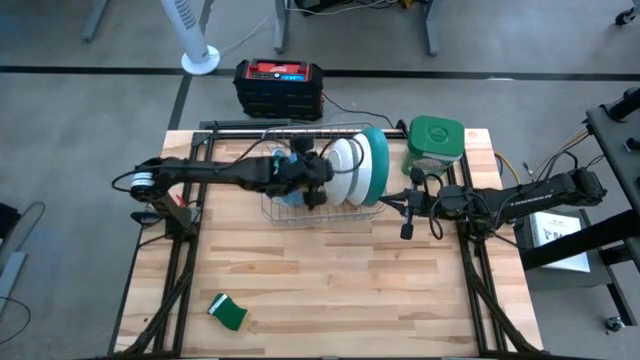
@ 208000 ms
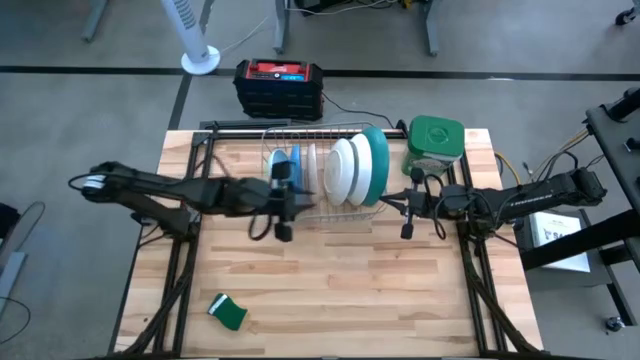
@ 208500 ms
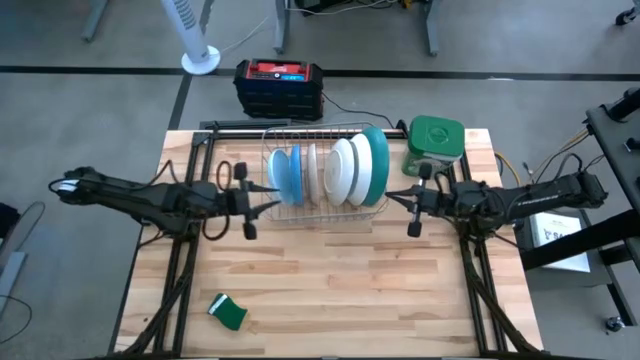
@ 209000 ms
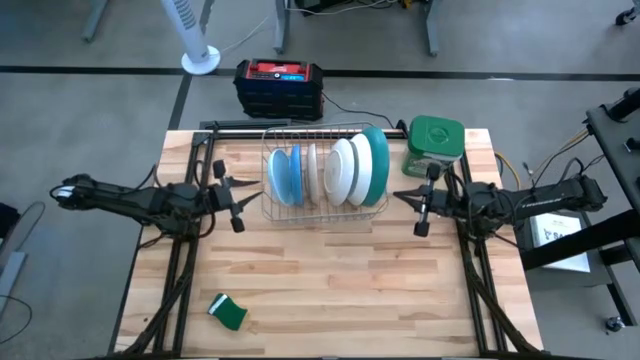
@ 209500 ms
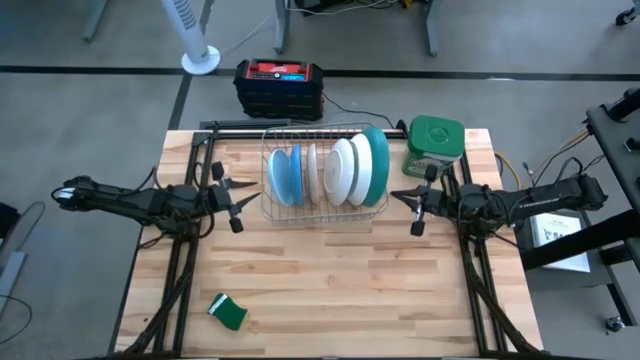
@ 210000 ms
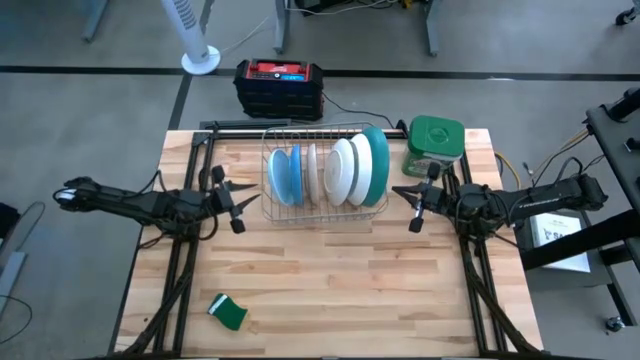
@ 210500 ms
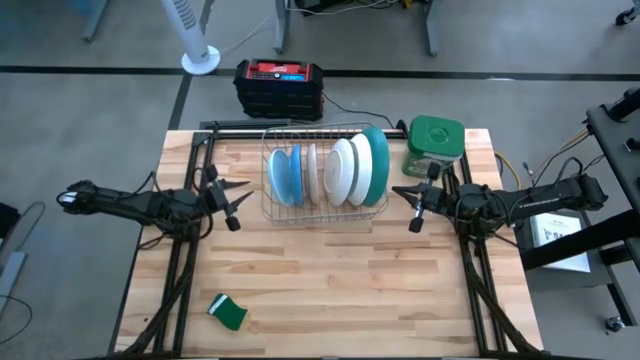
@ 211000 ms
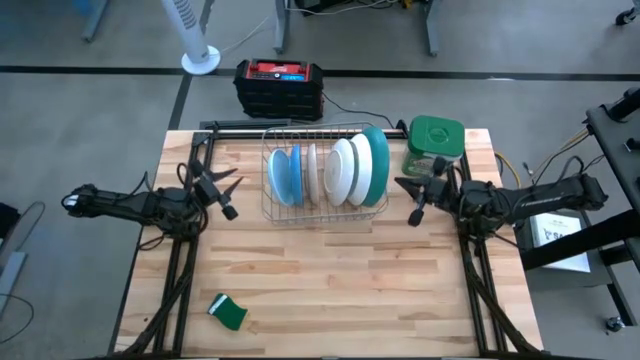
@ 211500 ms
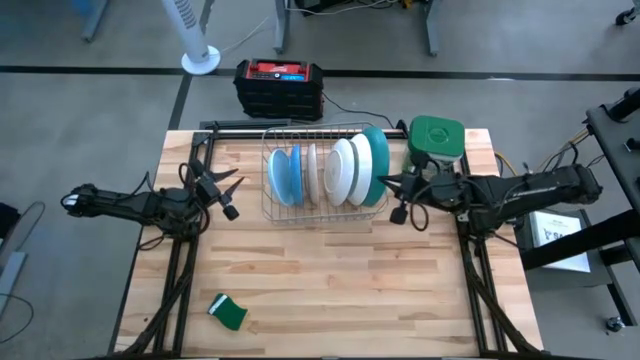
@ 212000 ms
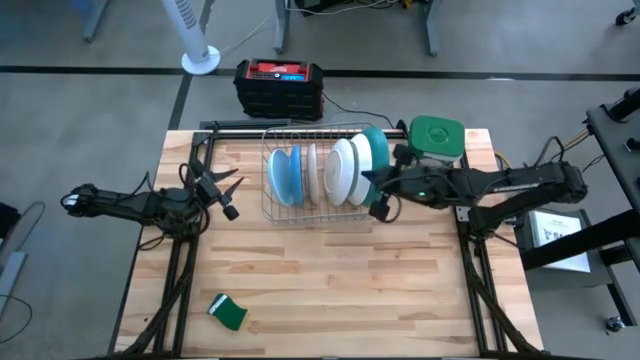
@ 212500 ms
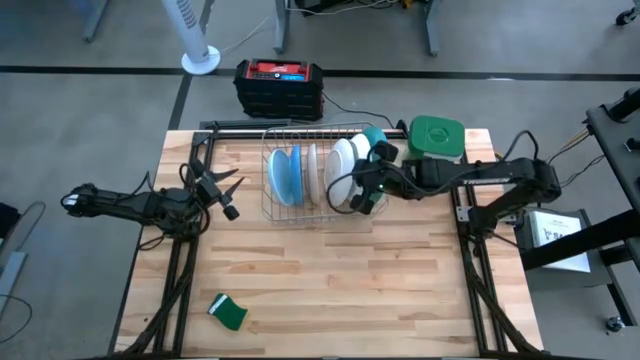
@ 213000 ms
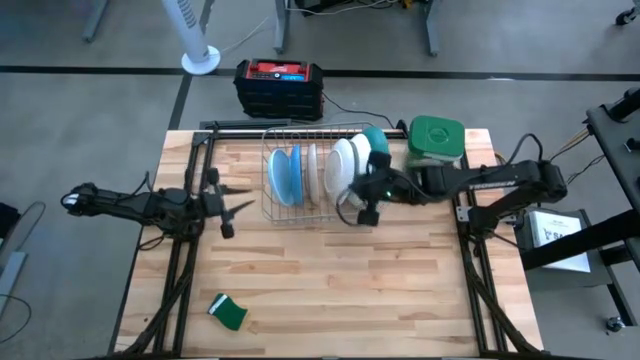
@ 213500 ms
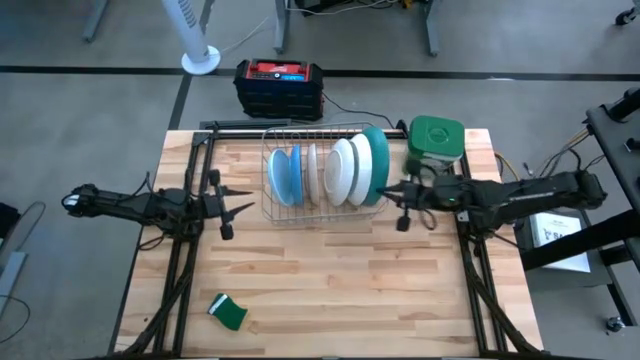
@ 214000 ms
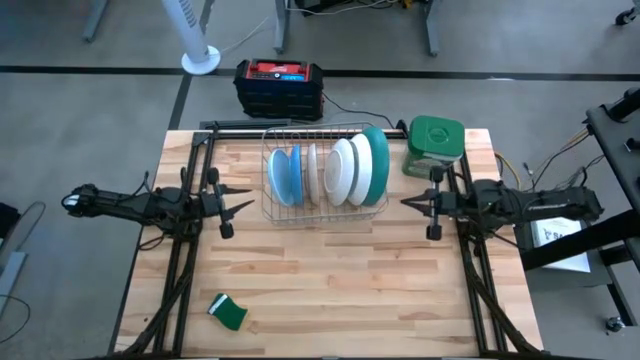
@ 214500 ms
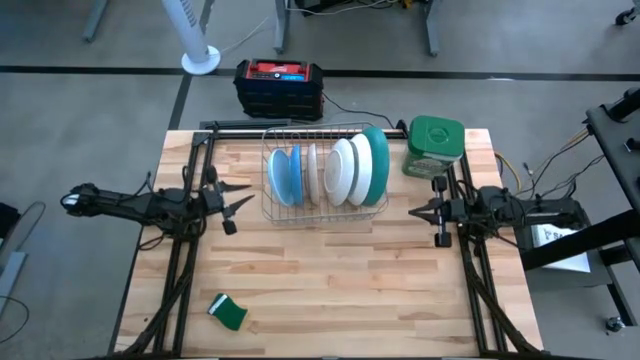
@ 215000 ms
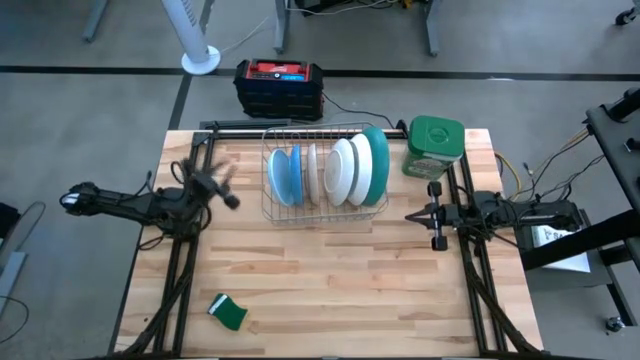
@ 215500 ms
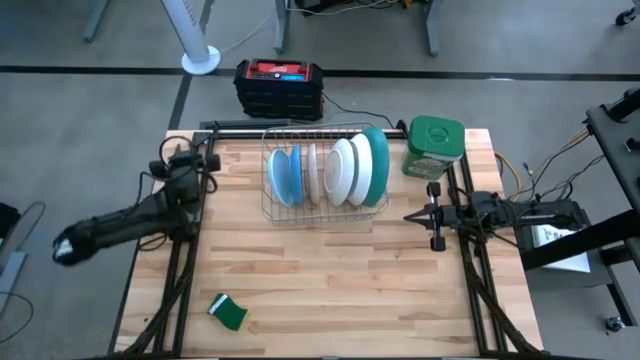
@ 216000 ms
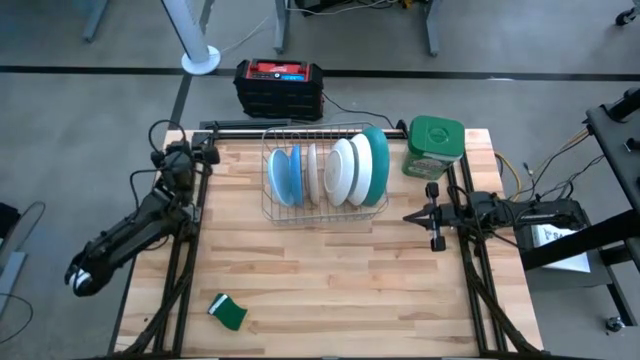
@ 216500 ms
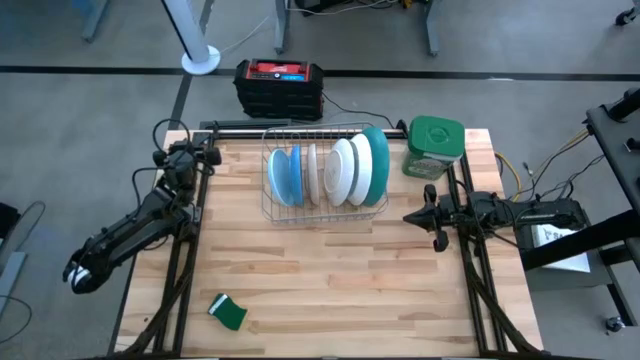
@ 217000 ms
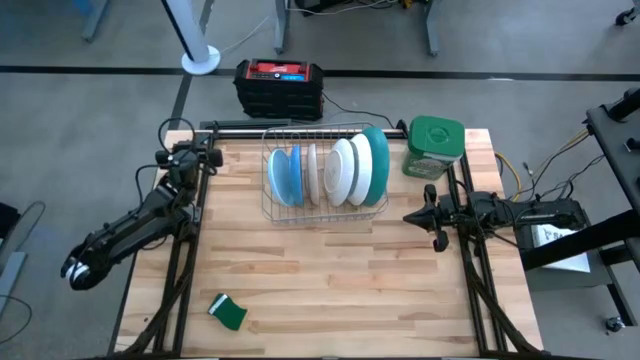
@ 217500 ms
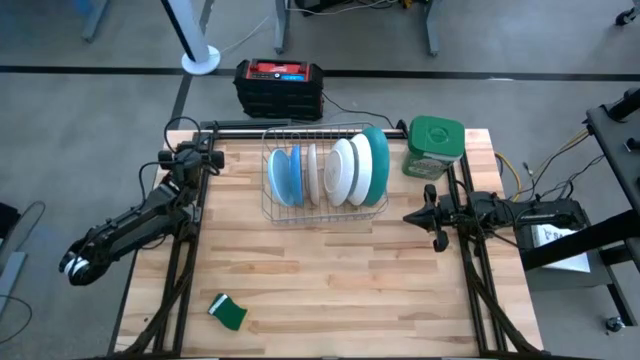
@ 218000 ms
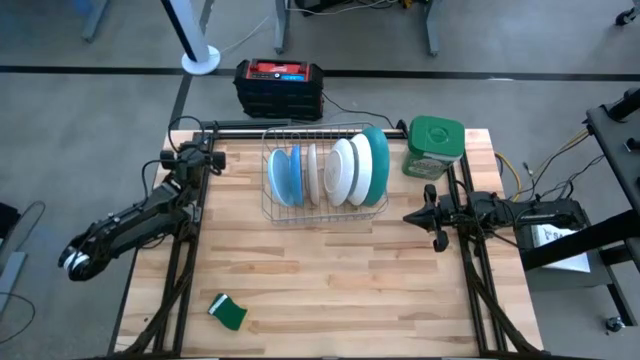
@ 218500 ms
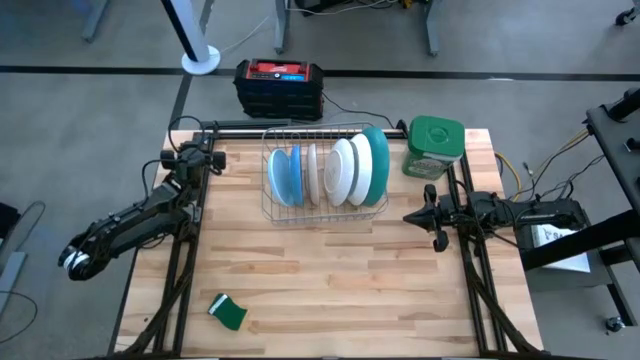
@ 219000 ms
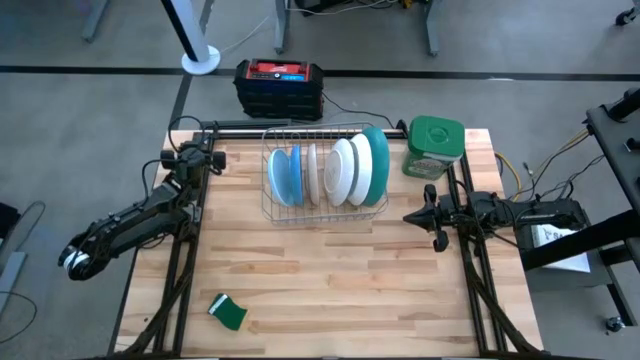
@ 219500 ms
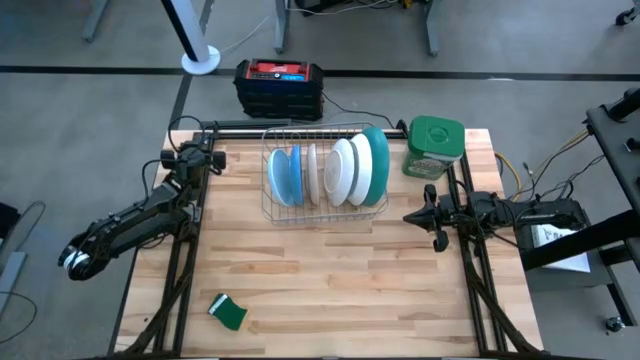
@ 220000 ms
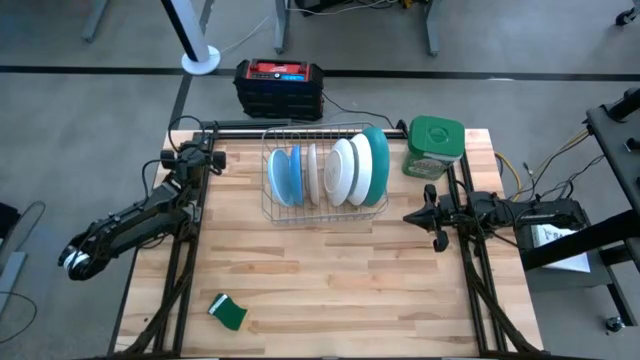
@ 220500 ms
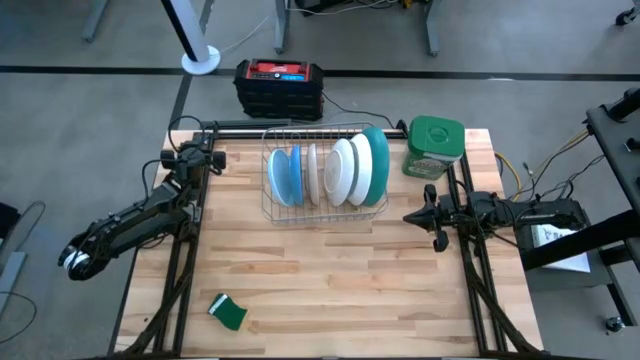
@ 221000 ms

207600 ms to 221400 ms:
Task: Sort dishes
Return to Home Position

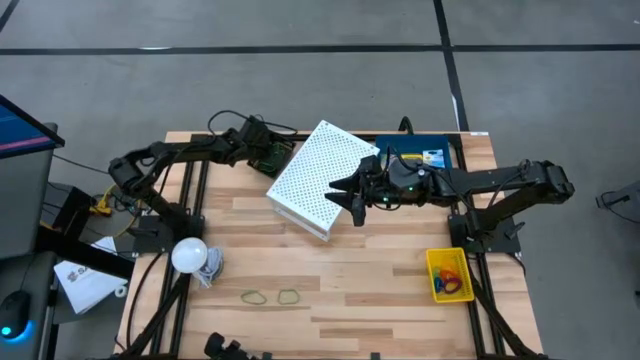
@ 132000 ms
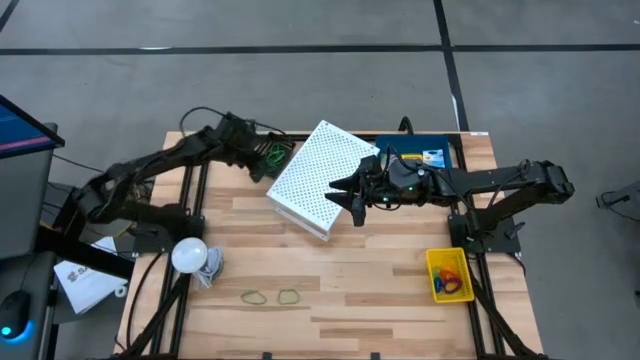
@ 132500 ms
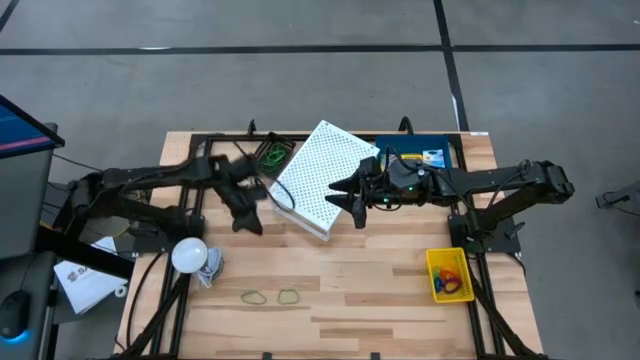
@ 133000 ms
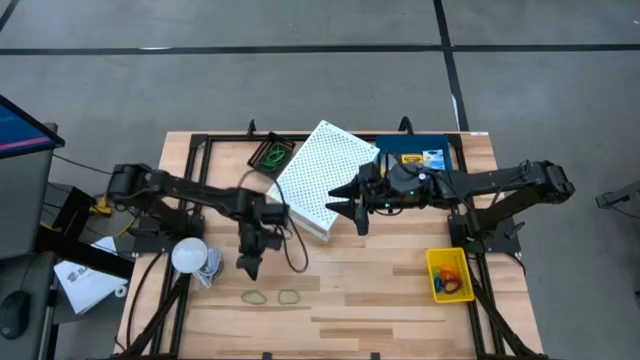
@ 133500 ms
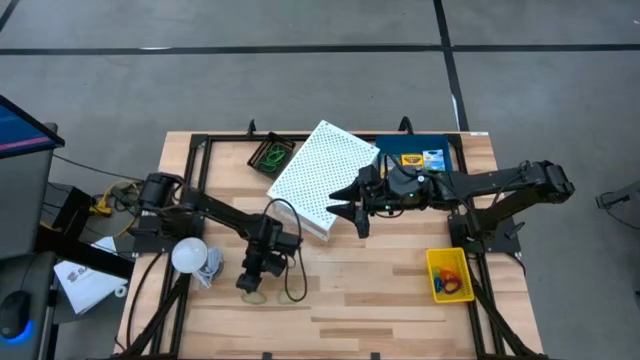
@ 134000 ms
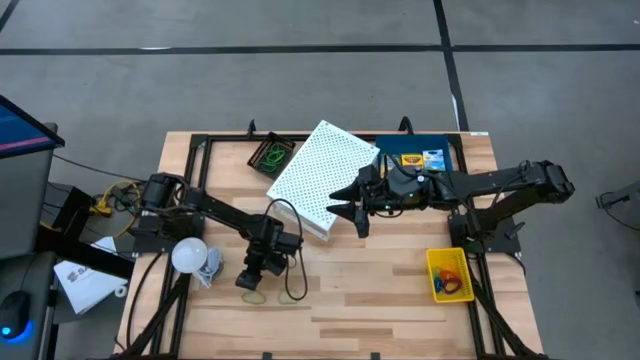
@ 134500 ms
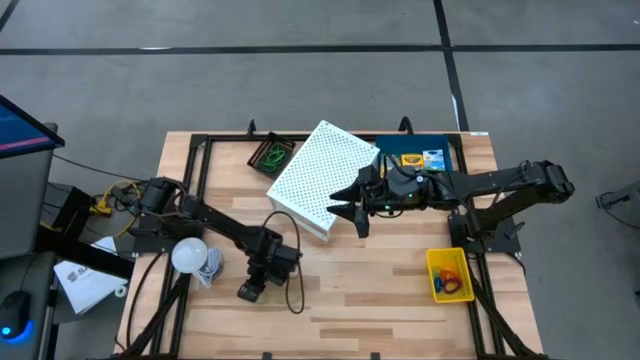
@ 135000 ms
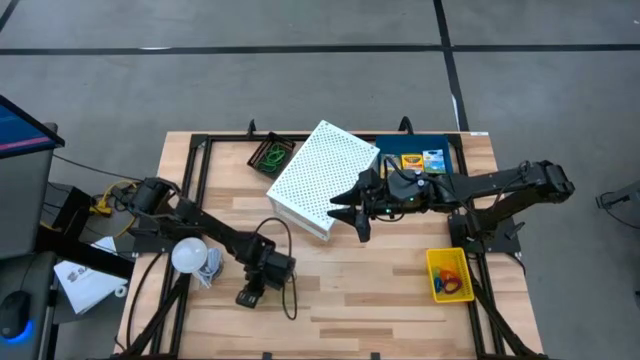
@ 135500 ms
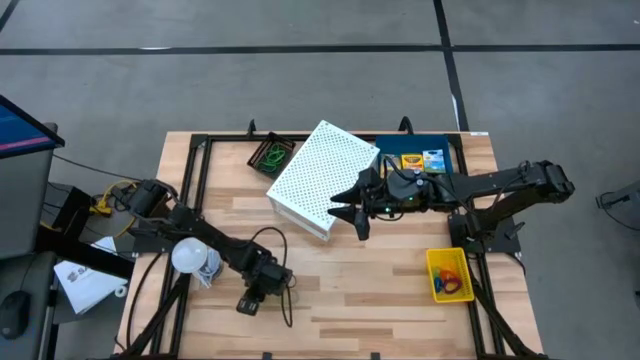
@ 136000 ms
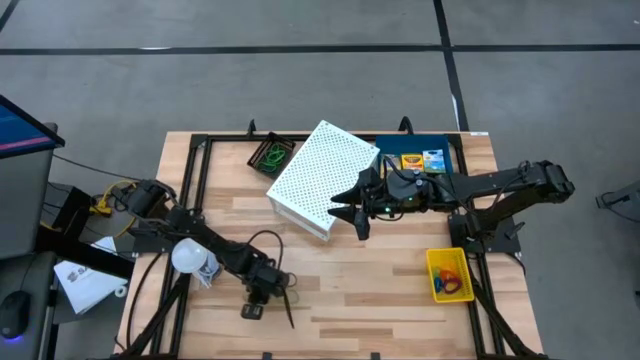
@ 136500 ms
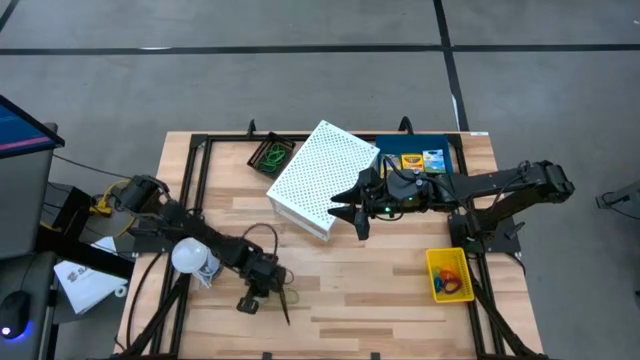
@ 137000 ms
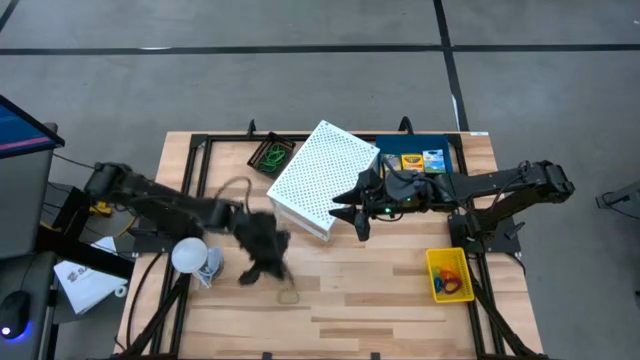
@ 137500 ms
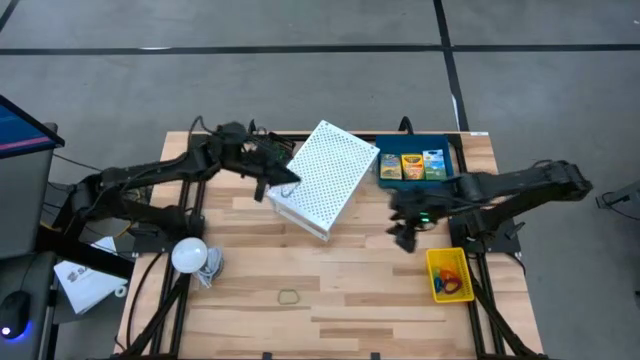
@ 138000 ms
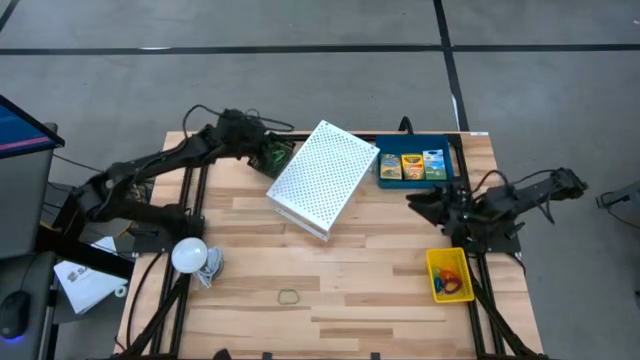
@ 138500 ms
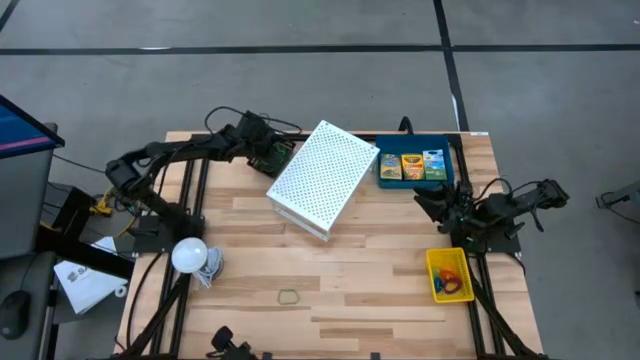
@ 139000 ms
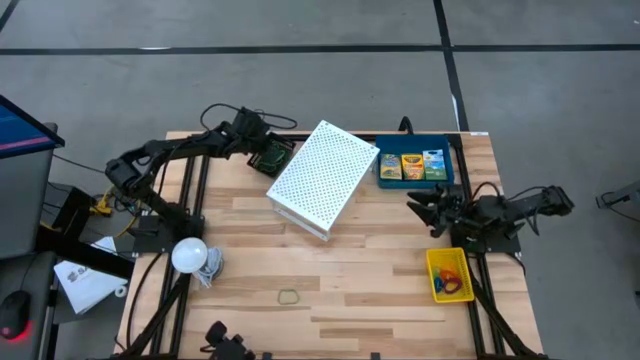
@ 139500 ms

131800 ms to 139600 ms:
Task: Pick & Place Office Desk Supplies
Put the green rubber band into the black bin
